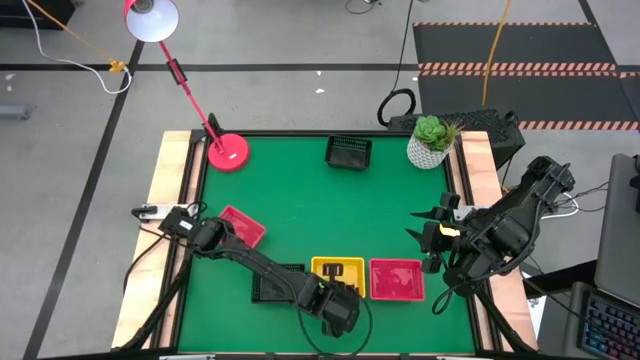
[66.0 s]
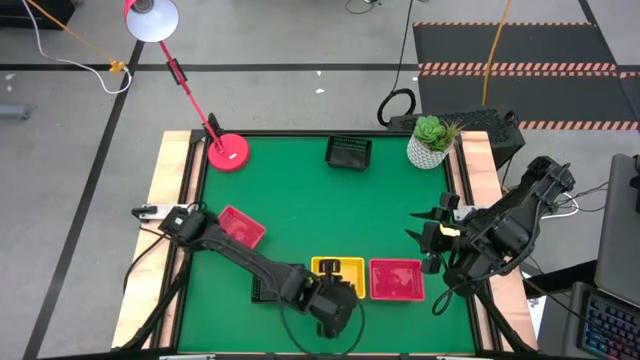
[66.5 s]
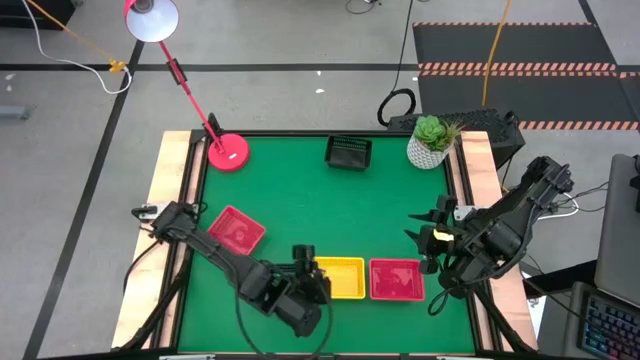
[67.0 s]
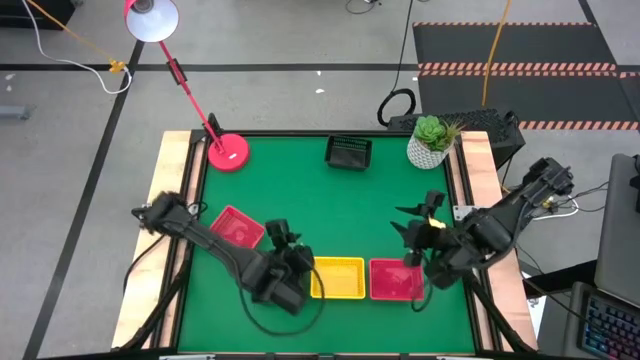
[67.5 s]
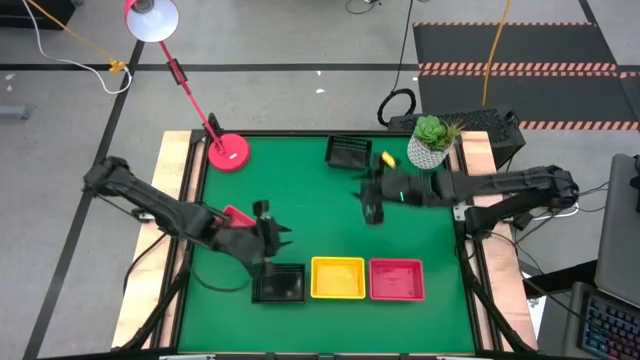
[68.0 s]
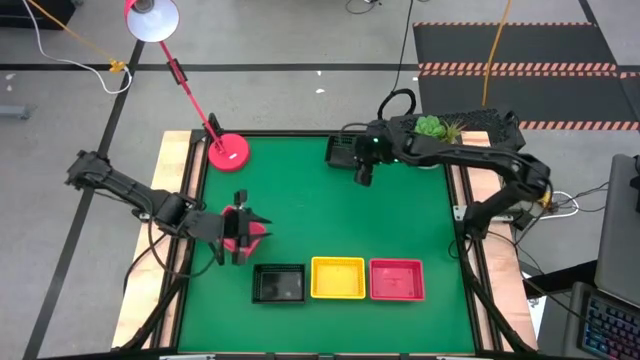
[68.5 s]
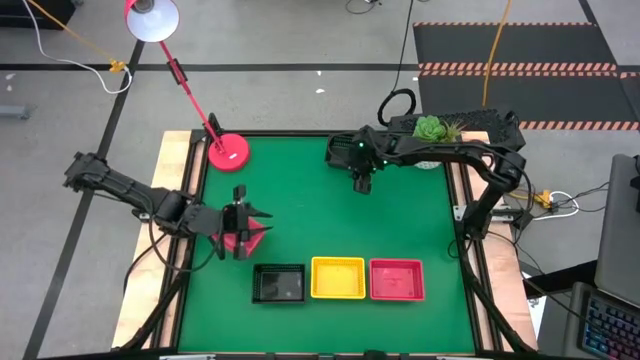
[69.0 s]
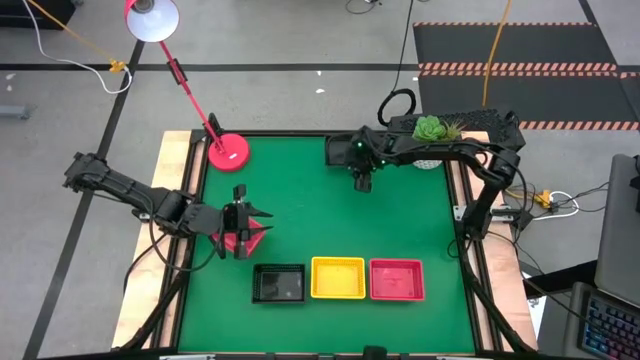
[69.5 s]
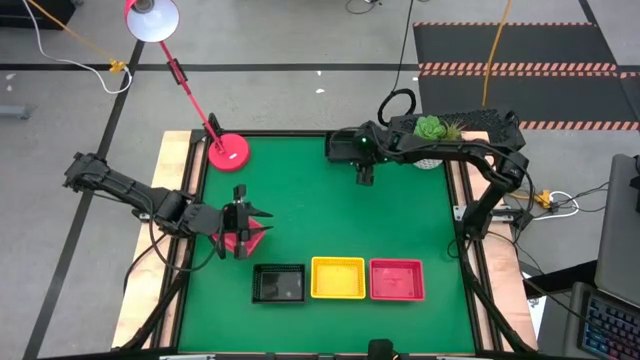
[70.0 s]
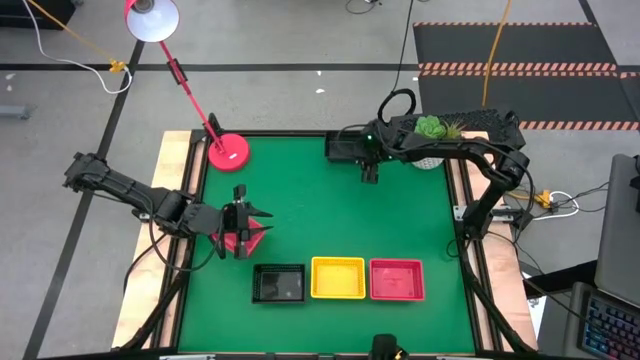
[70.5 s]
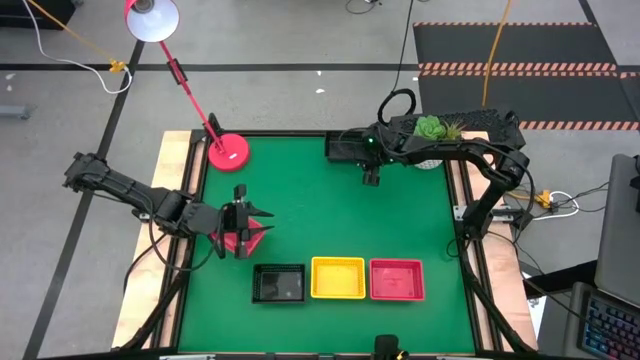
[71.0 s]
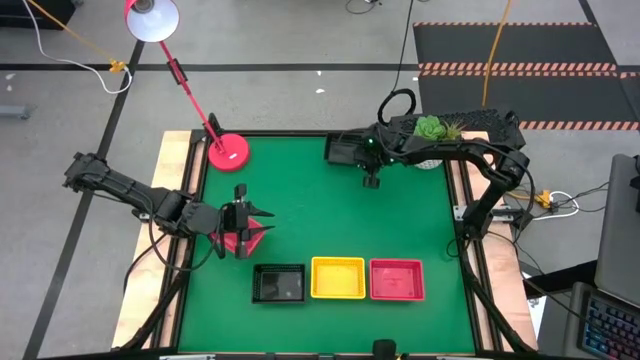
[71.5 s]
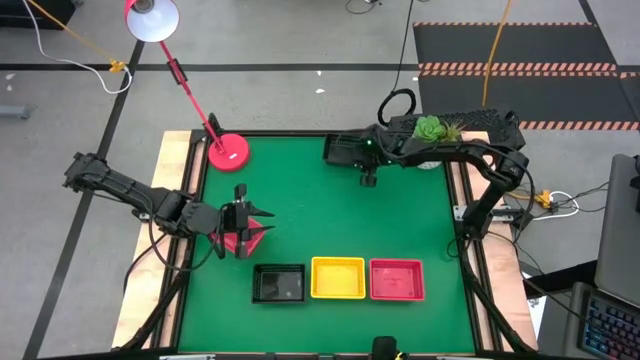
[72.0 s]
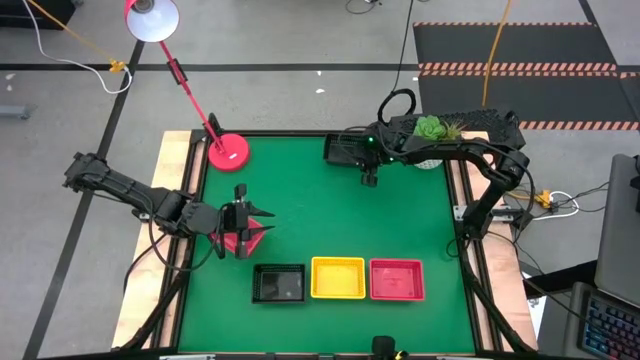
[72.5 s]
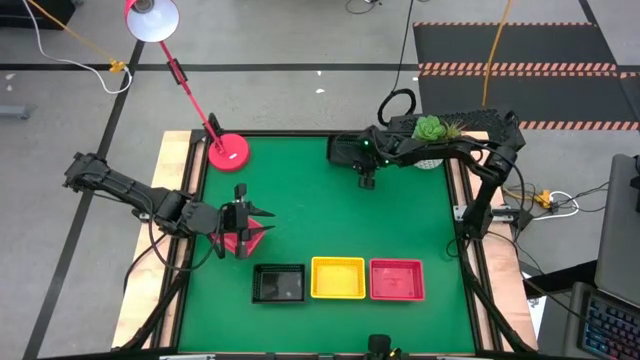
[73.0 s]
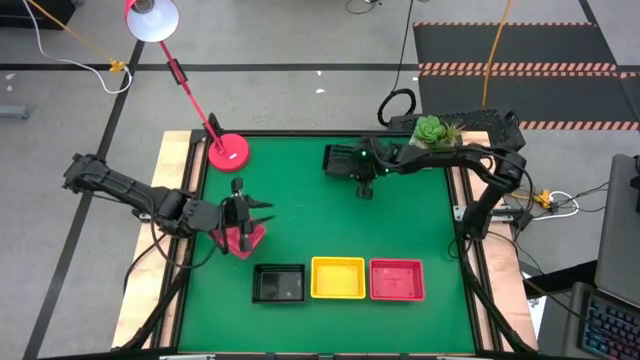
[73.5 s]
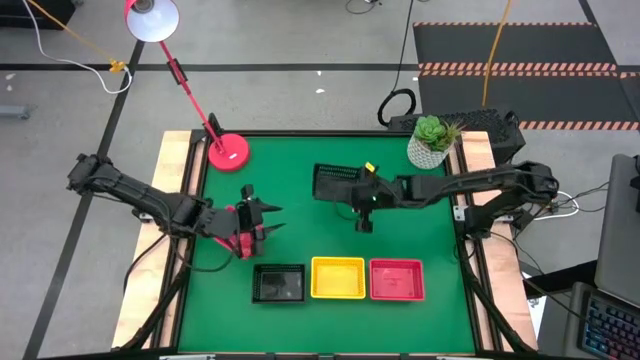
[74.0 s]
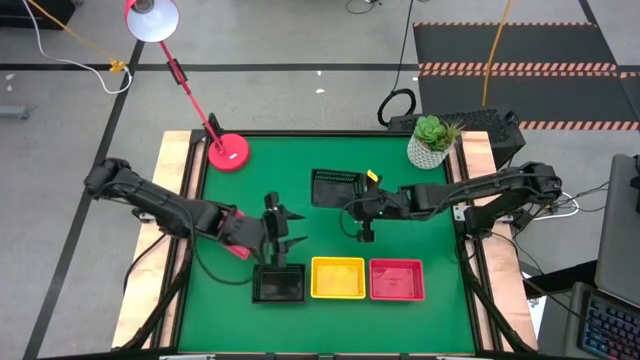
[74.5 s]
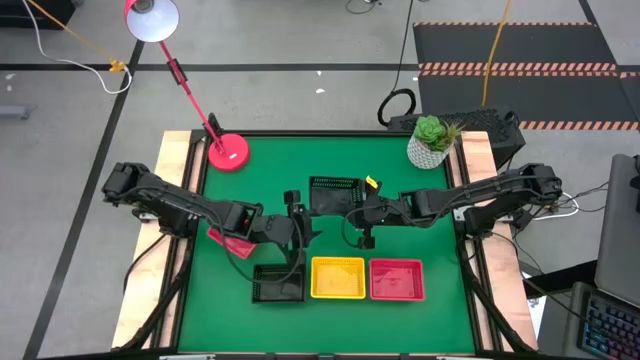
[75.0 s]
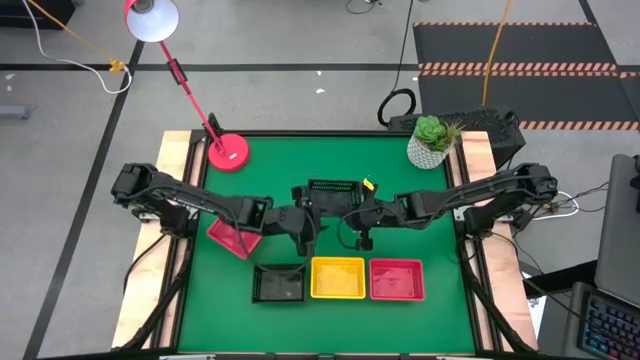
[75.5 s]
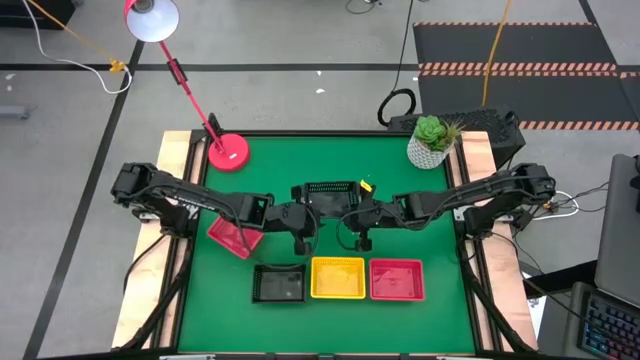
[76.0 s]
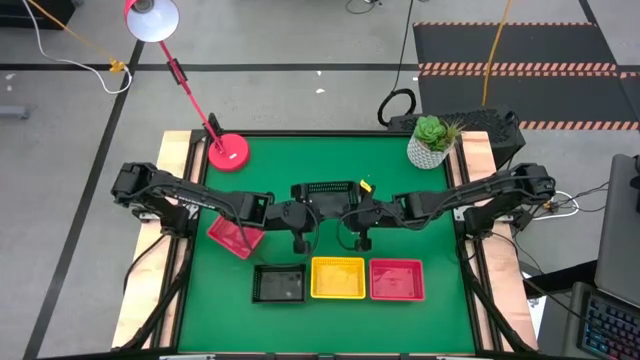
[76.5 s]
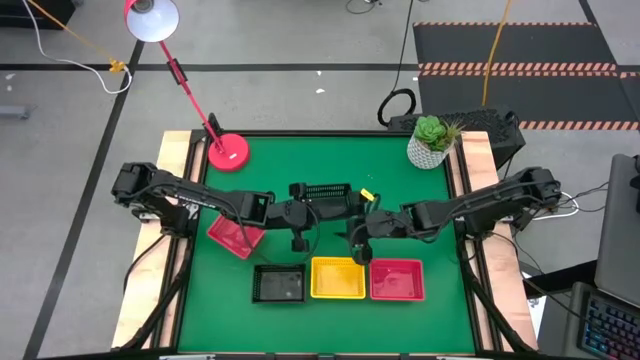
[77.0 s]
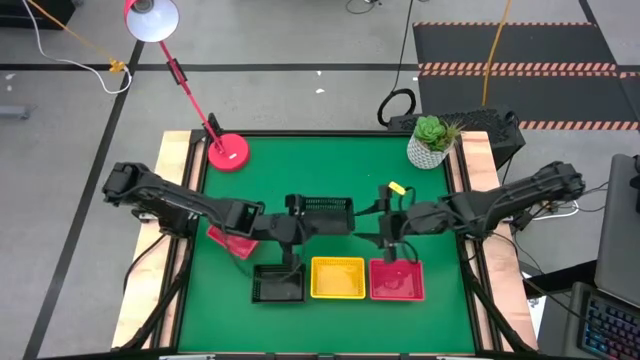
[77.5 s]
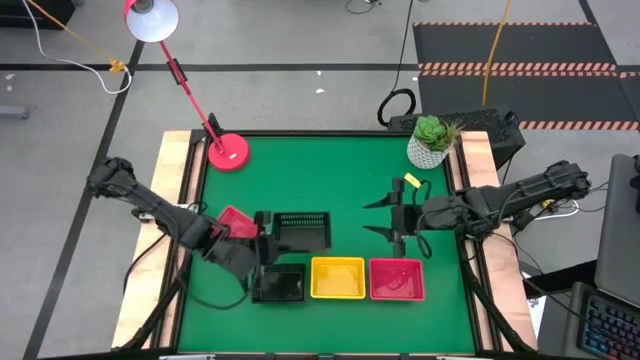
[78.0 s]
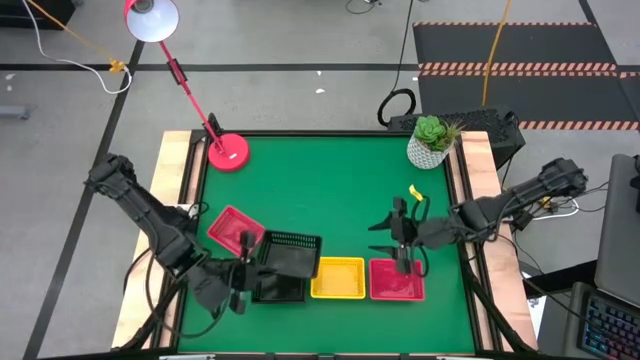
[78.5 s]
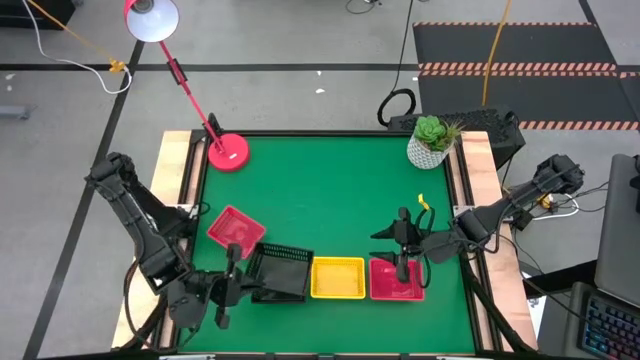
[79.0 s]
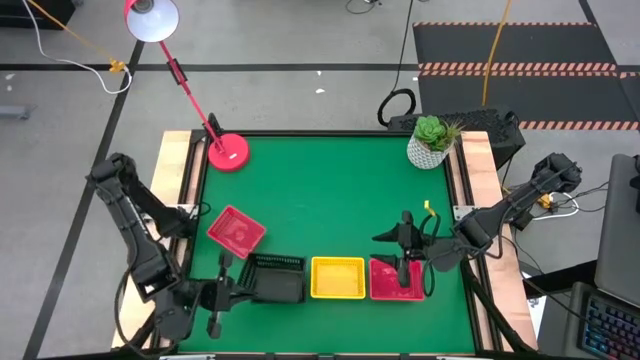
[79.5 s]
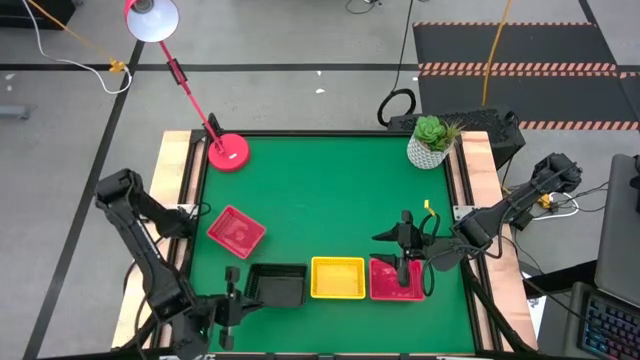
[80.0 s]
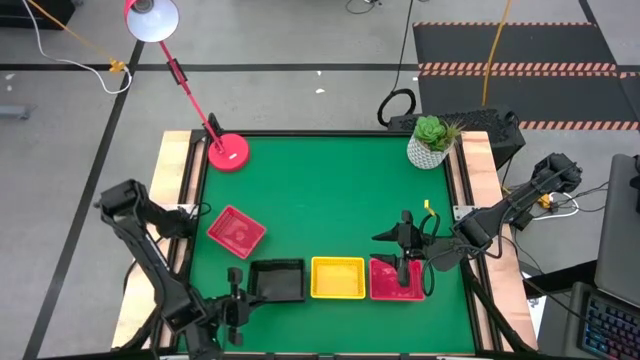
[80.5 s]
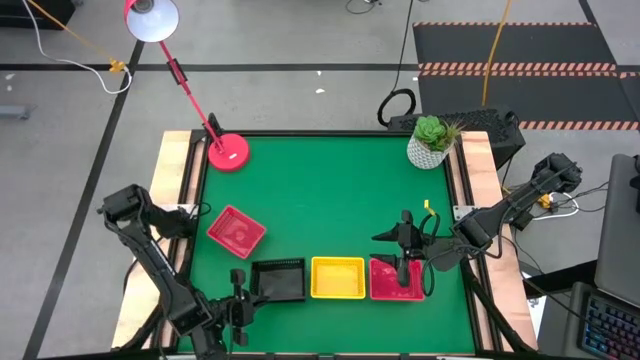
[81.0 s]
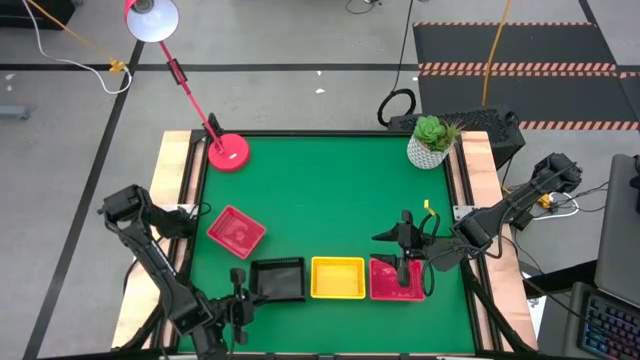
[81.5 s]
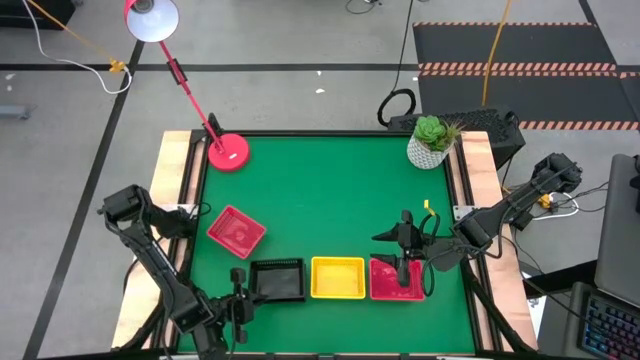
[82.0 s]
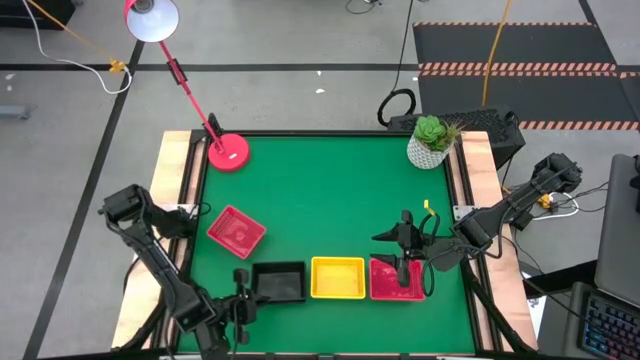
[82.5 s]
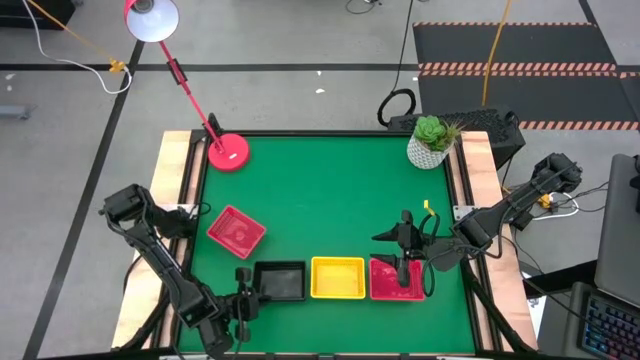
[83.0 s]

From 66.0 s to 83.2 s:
Stack the top black bin on top of the bottom black bin

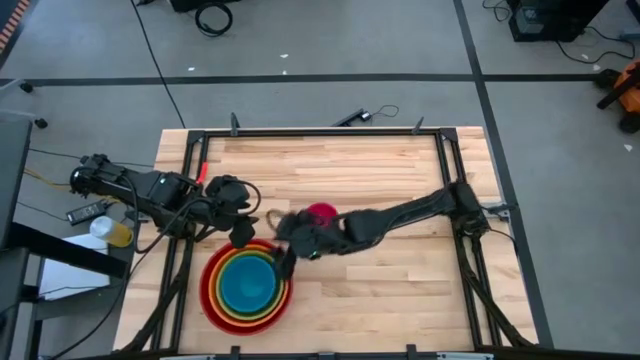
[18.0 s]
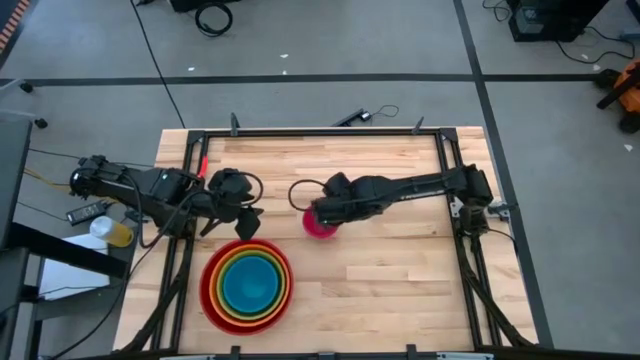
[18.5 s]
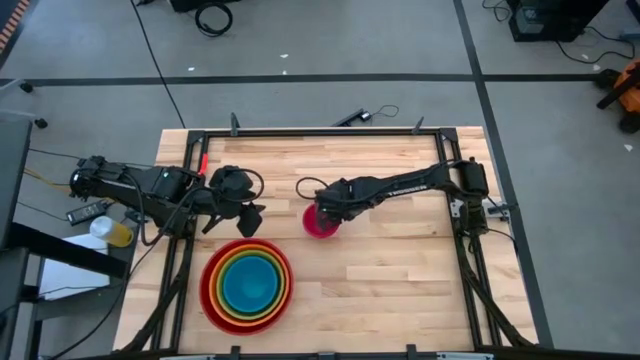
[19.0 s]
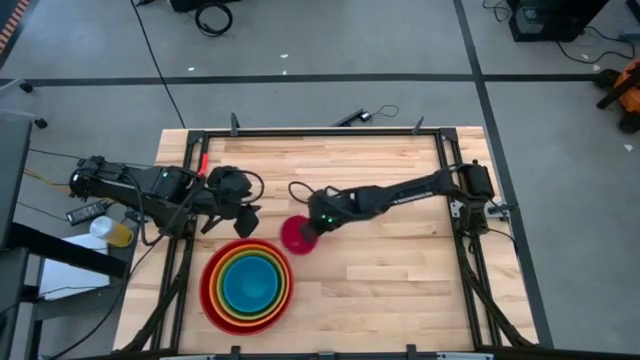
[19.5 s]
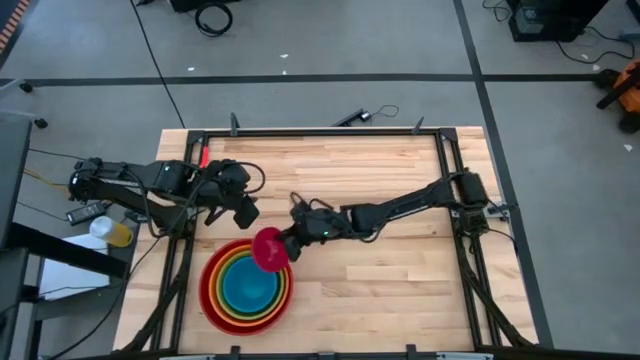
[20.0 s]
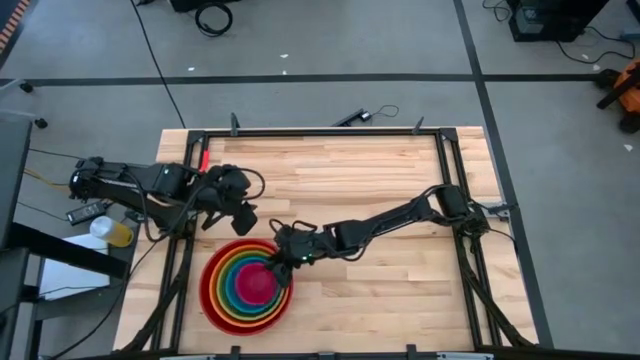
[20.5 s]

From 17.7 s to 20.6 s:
Stack the pink bowl on the blue bowl

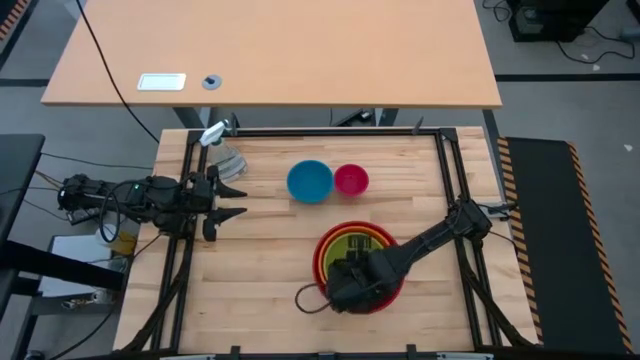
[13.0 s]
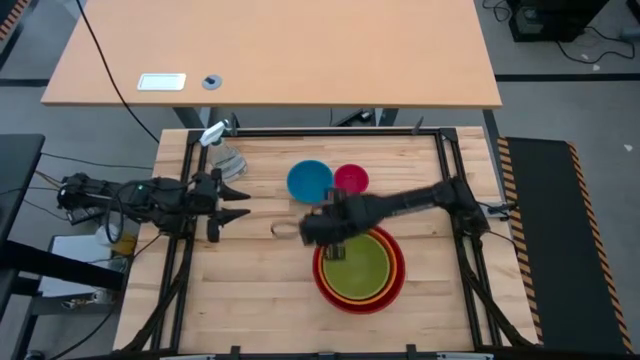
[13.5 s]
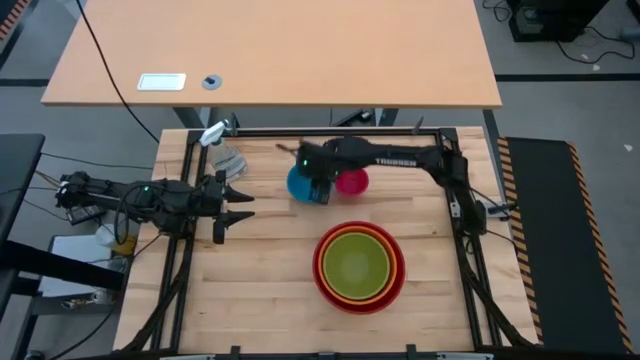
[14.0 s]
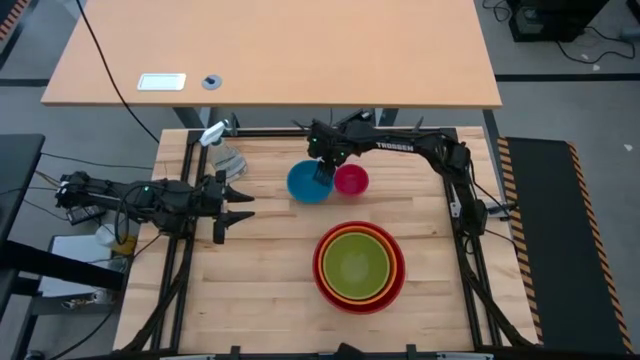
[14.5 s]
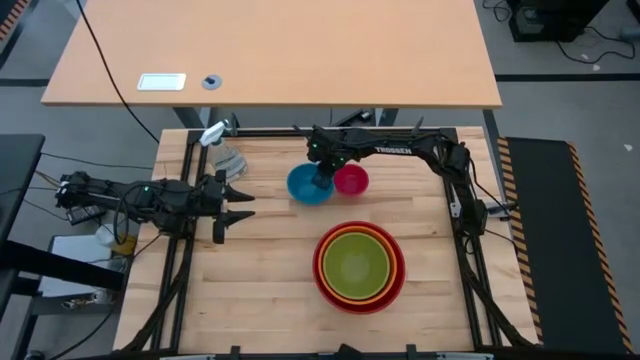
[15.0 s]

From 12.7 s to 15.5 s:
Stack the blue bowl on top of the green bowl
